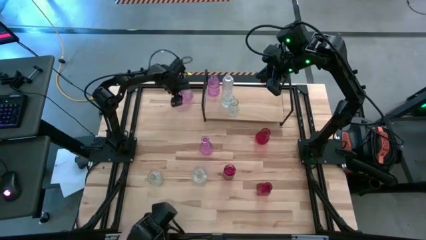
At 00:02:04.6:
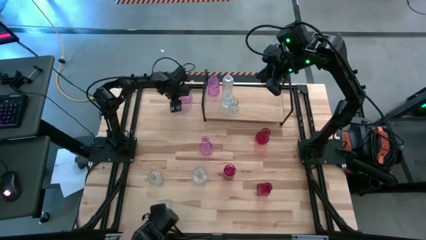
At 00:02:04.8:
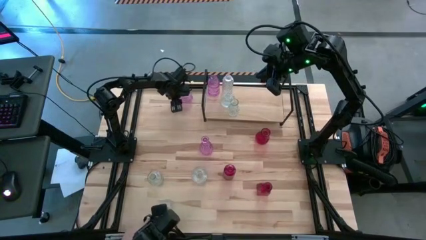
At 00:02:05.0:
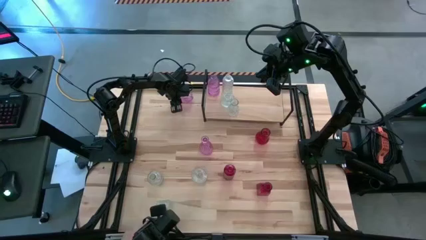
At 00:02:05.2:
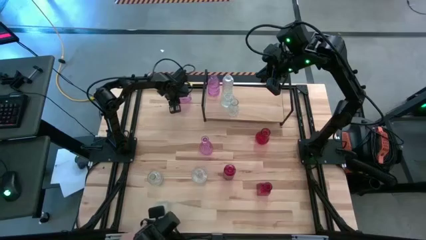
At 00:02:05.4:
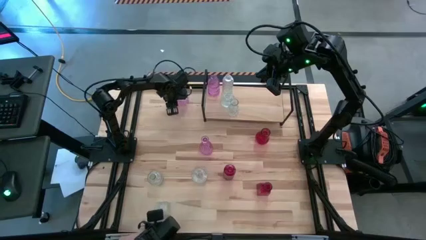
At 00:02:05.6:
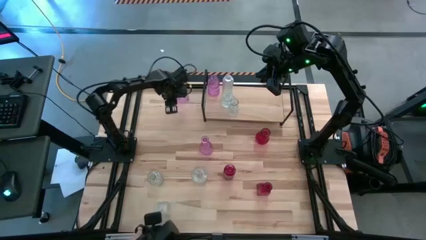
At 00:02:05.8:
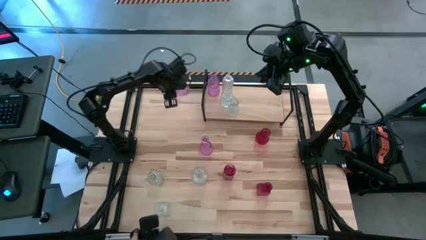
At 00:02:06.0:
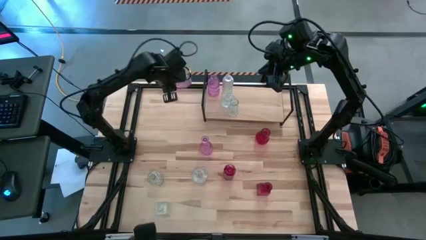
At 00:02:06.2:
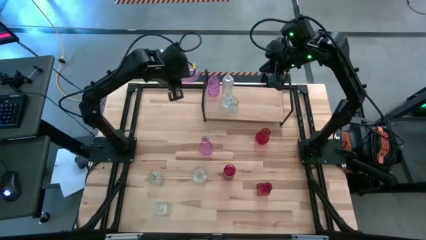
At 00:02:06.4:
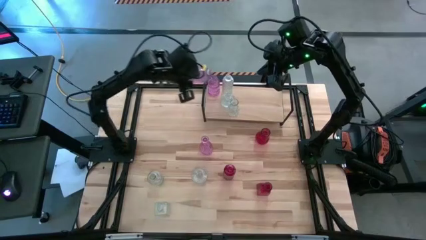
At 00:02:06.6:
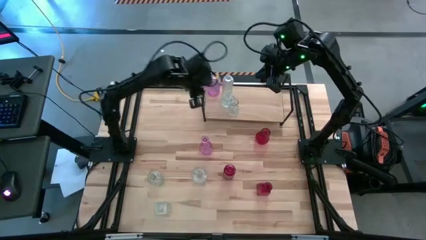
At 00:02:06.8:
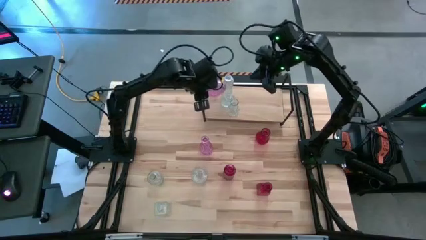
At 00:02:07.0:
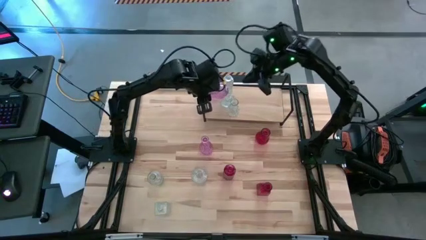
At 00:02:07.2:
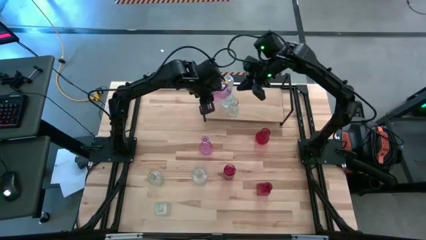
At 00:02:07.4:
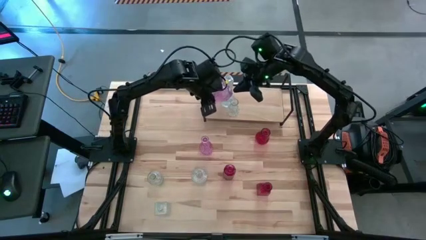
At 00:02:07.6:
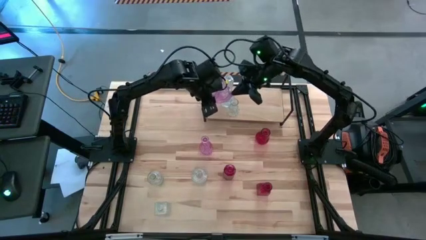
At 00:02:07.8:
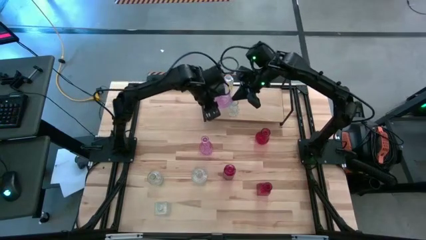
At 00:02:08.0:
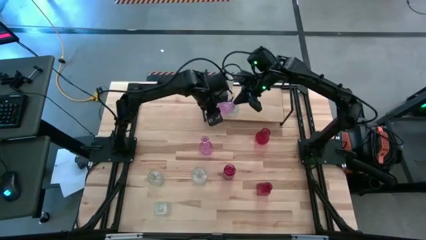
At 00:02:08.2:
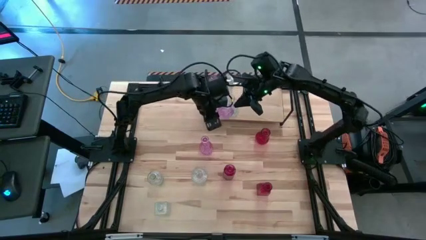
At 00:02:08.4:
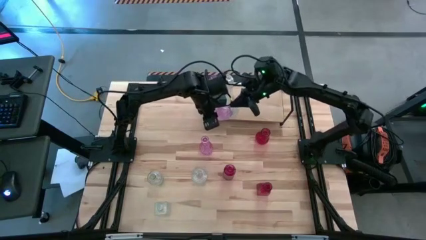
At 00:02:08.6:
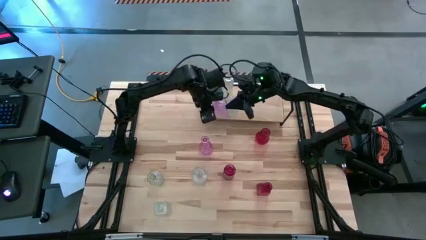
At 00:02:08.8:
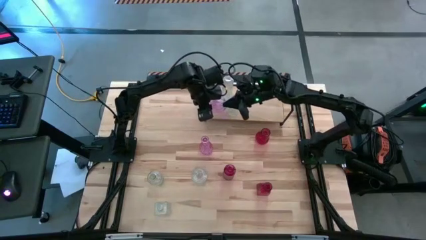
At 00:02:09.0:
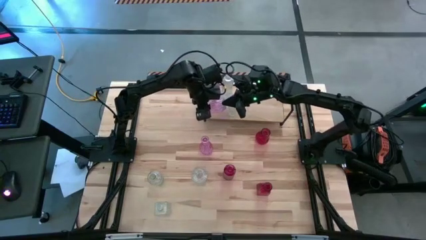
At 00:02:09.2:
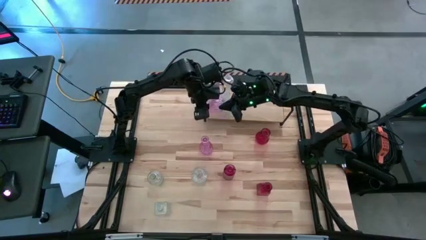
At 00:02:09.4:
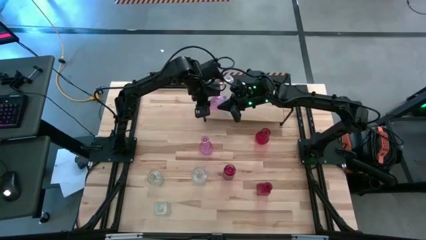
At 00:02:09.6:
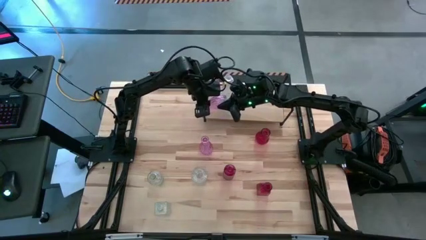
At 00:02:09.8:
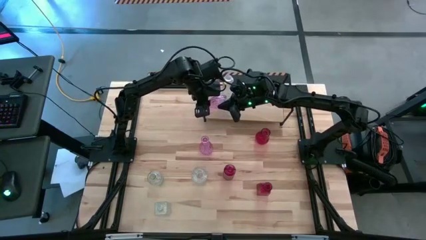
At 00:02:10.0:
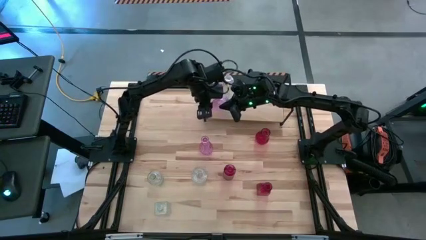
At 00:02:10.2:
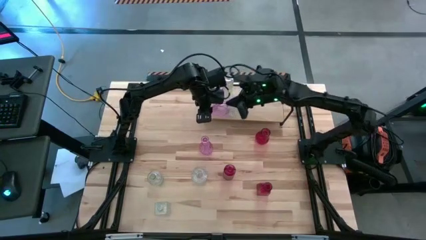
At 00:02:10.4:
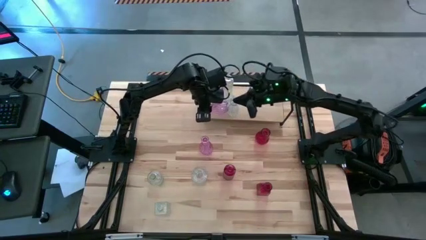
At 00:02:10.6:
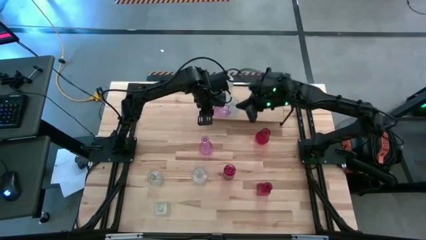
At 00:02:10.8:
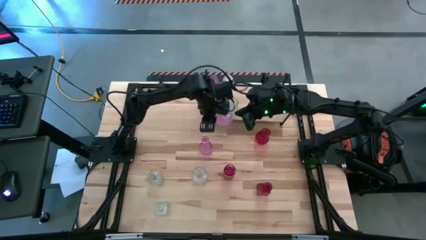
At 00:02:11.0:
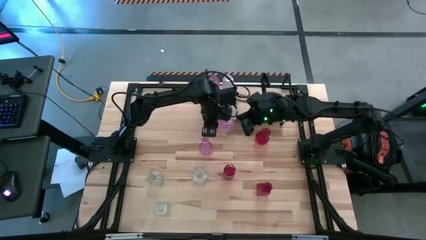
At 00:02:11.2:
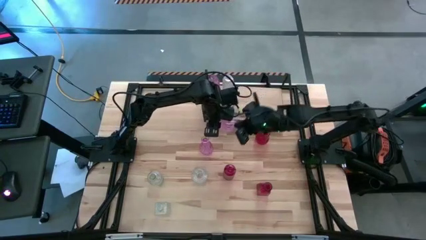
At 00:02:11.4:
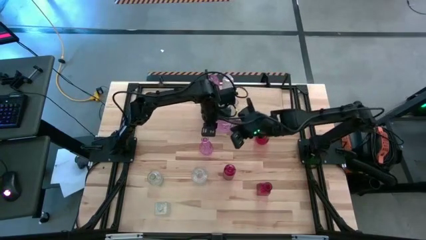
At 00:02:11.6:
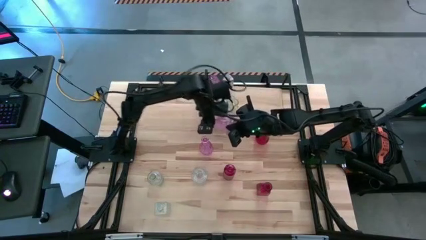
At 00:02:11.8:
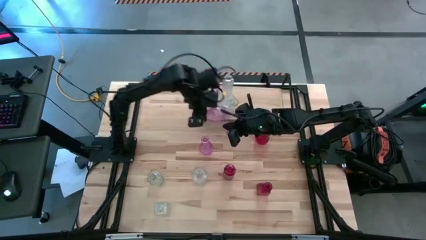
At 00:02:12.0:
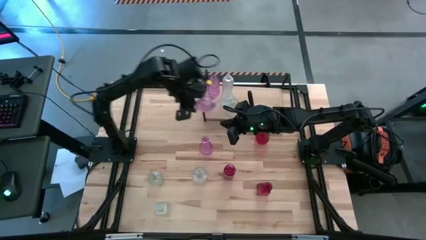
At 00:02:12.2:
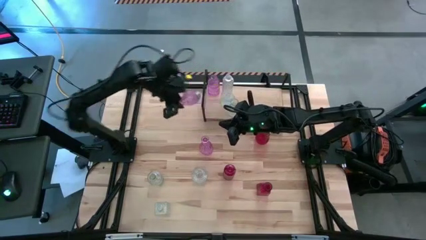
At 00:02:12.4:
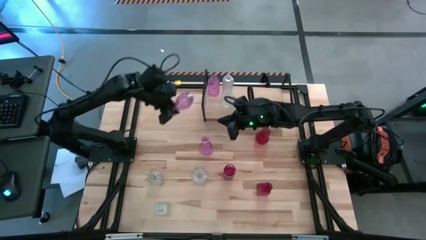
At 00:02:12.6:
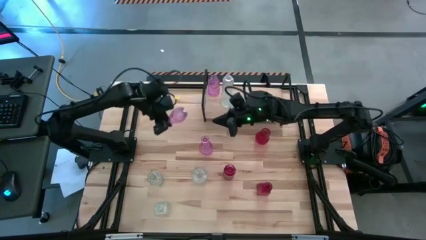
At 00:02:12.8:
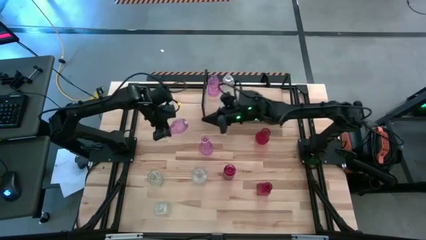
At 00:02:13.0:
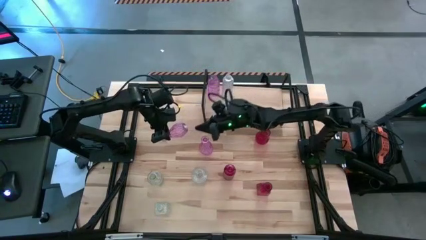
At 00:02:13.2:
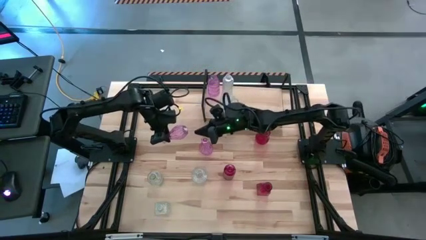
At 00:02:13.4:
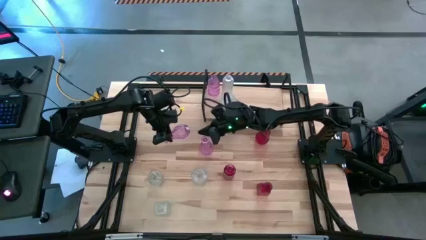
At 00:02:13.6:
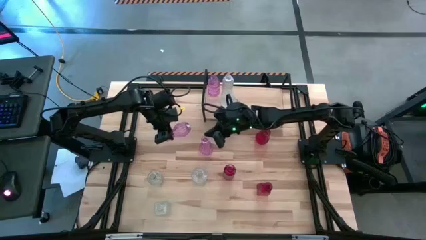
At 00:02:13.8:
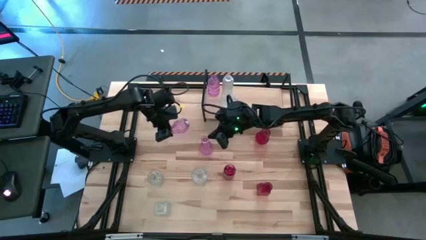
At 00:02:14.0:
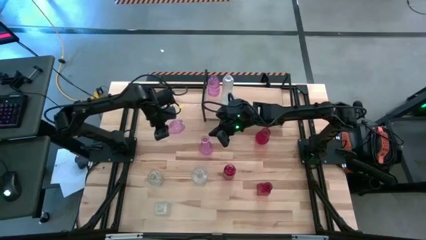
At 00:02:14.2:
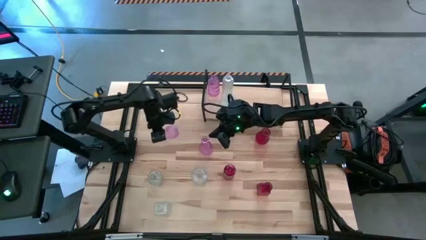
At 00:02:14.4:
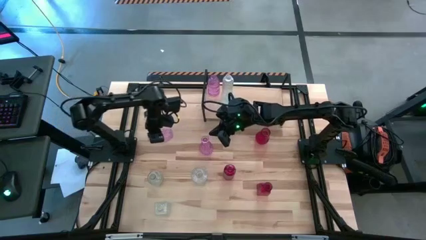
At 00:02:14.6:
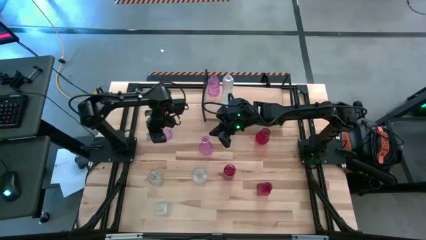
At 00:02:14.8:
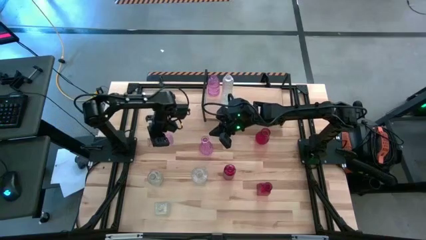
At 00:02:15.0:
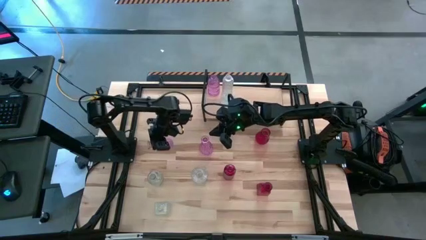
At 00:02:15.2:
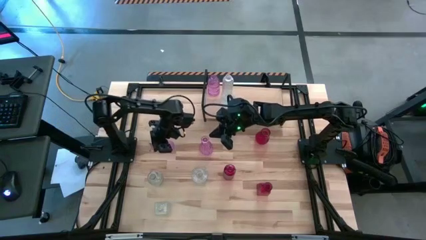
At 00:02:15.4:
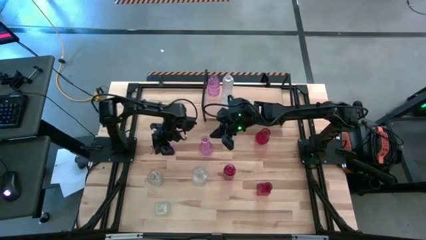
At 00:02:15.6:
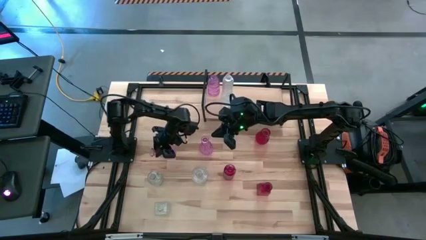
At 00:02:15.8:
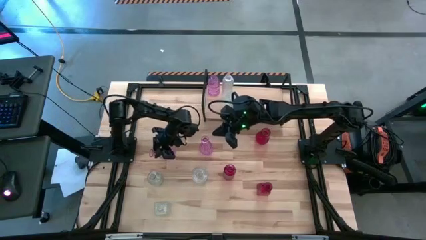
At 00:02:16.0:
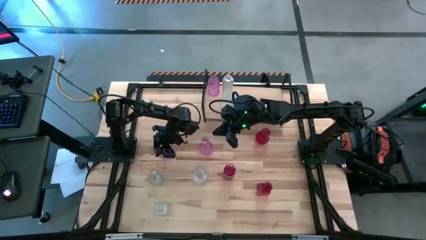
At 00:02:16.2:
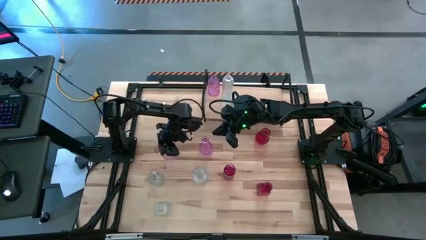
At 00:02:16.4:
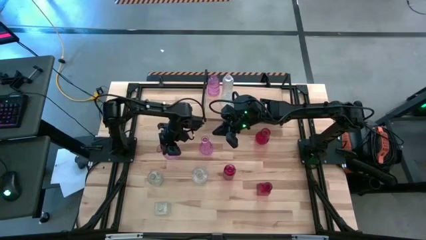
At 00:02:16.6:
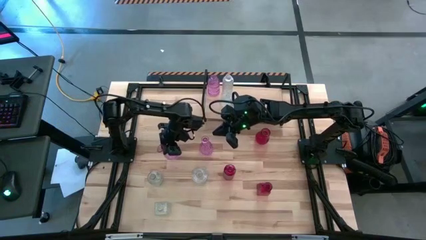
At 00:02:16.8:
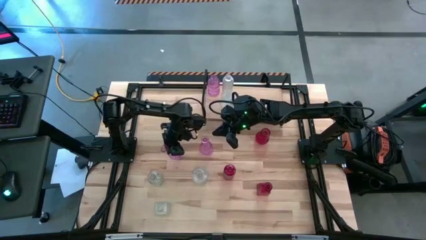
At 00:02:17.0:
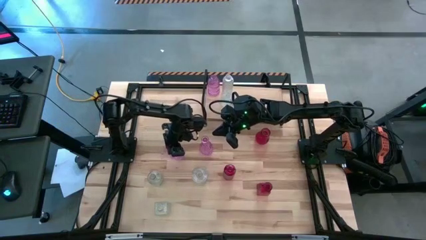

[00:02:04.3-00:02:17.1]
Task: sort vases onto shelf
Align the violet vase with the other violet vase on the shelf
